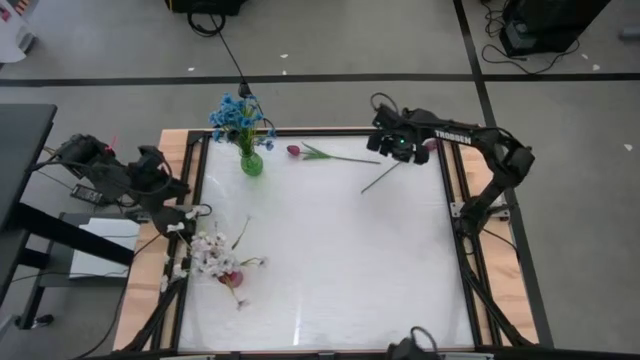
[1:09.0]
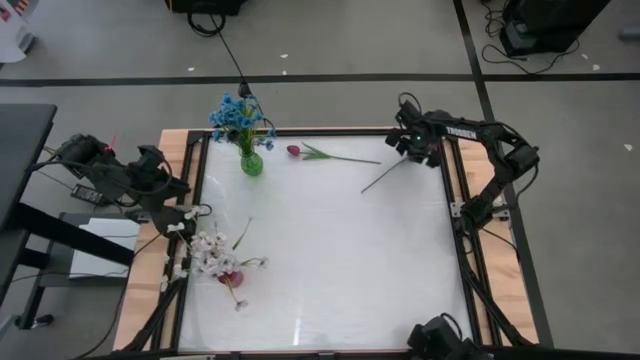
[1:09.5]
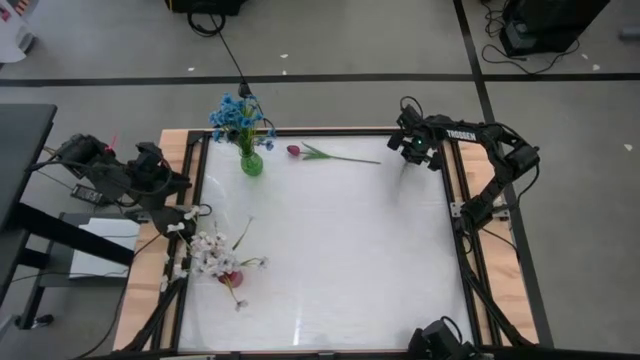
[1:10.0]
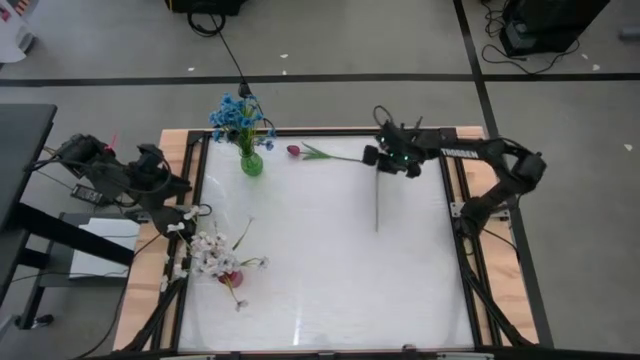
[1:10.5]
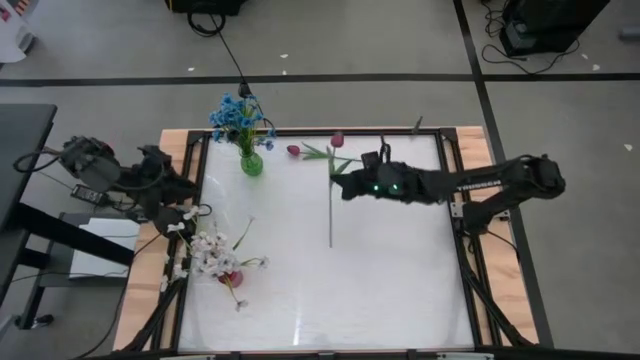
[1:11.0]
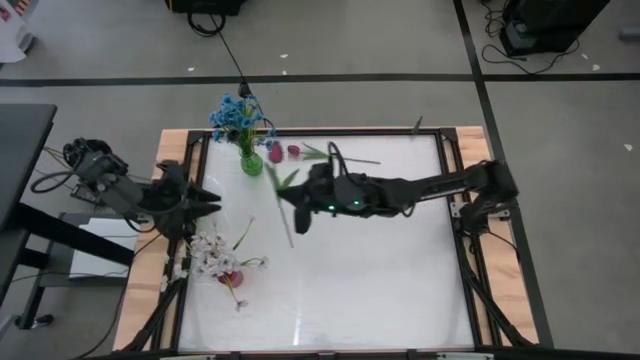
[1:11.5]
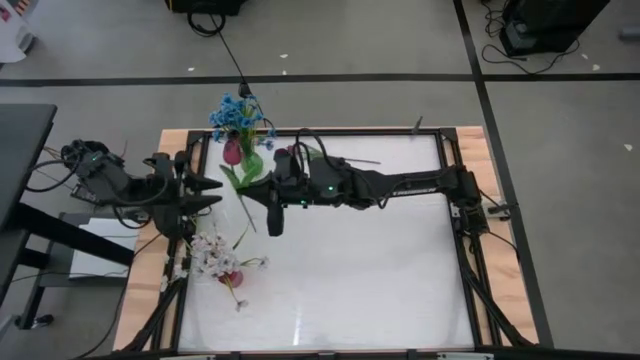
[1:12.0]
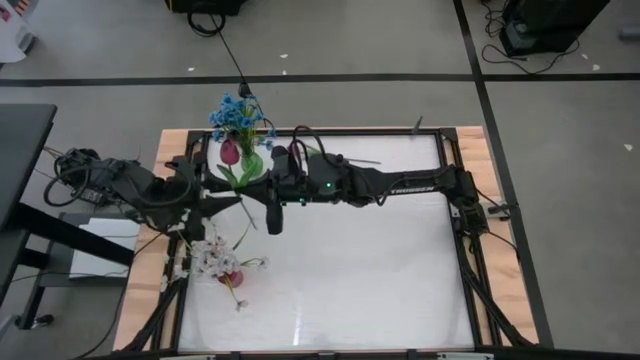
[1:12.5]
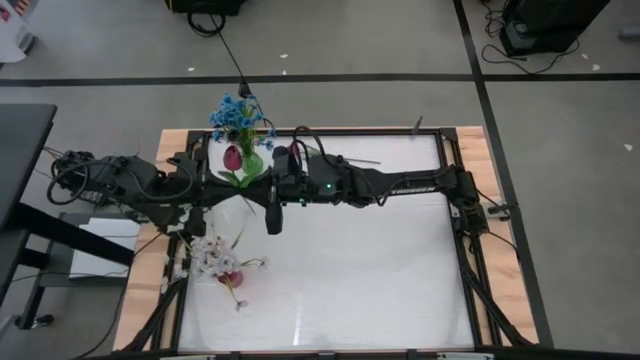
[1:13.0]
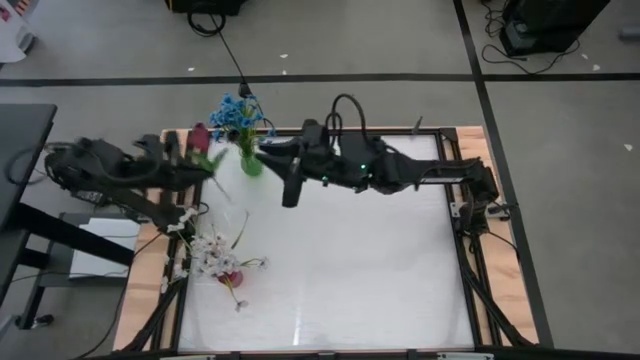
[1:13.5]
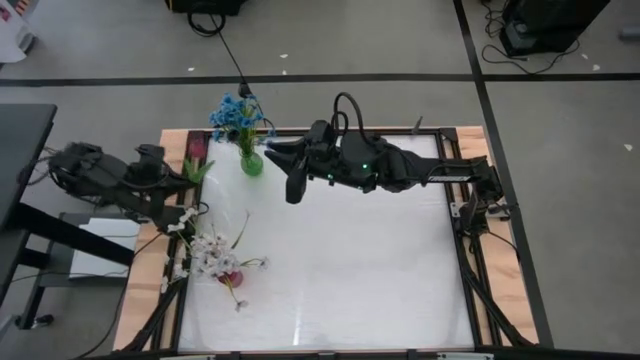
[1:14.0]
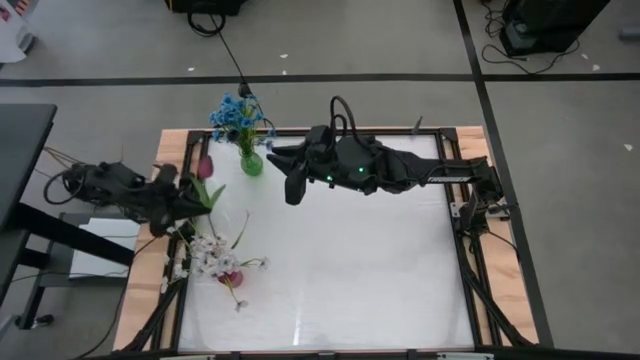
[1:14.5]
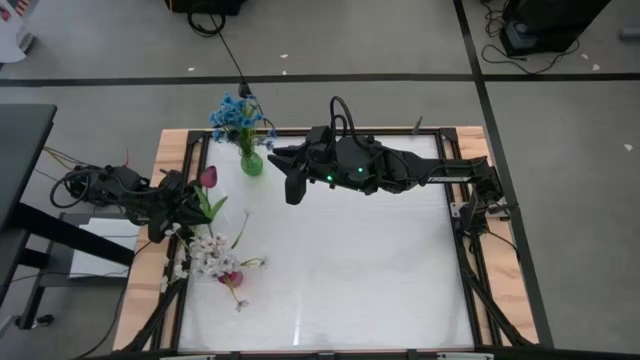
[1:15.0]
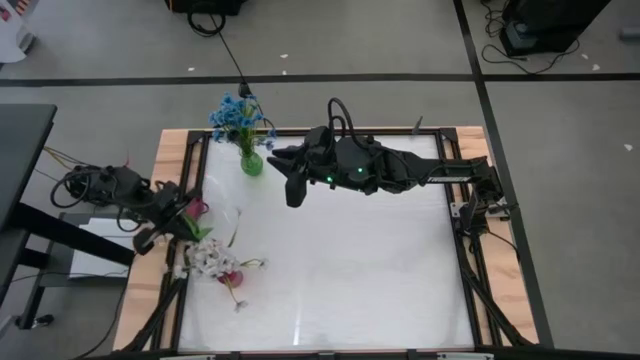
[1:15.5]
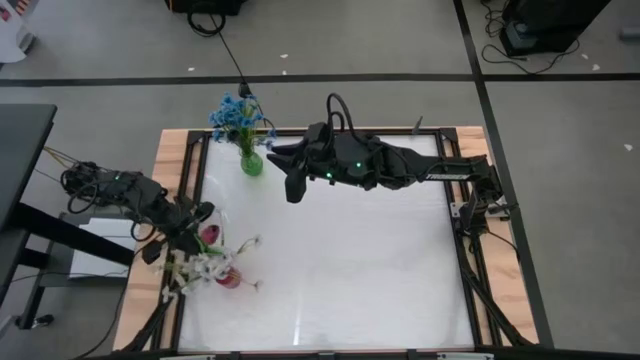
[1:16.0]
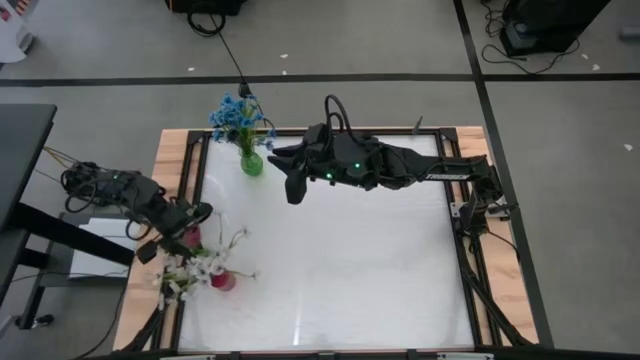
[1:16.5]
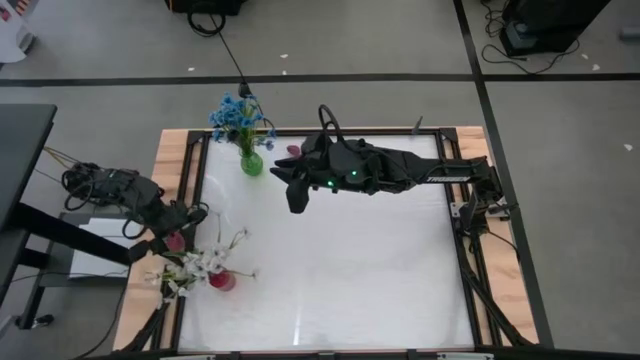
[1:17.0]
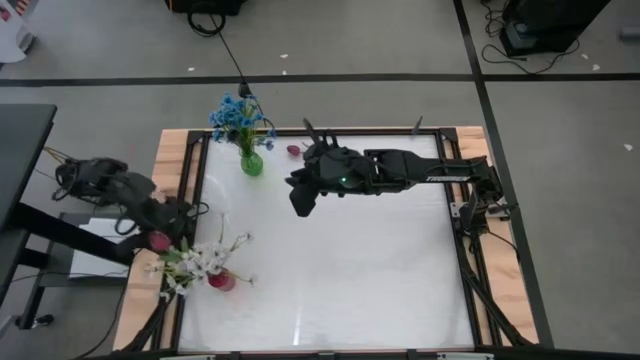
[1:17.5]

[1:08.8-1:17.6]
Task: Sort flowers into vase by color
Put the right red tulip into the red vase

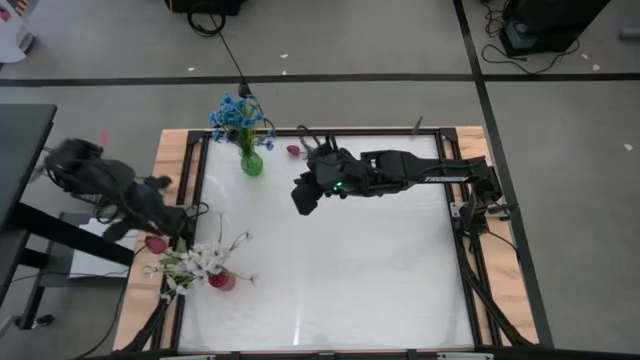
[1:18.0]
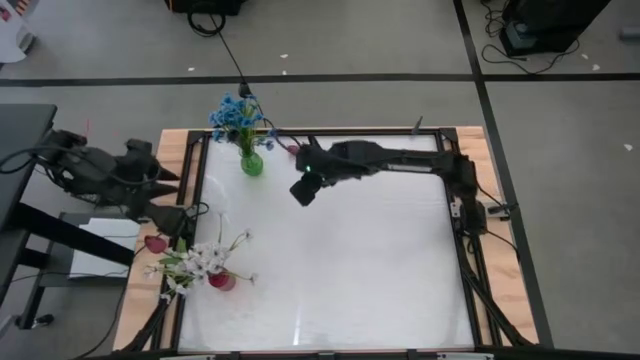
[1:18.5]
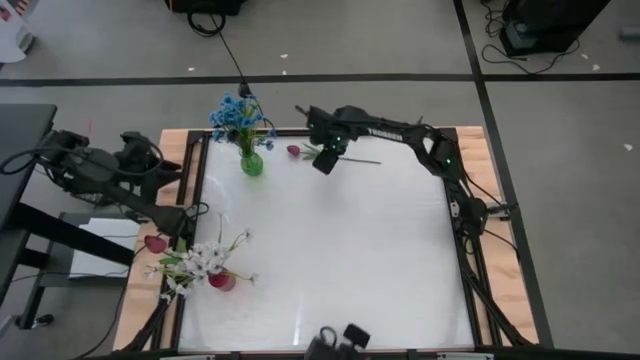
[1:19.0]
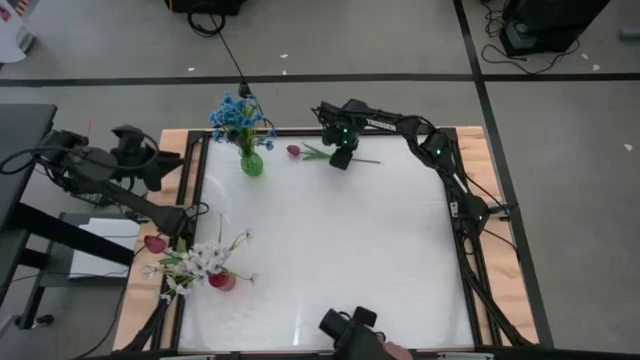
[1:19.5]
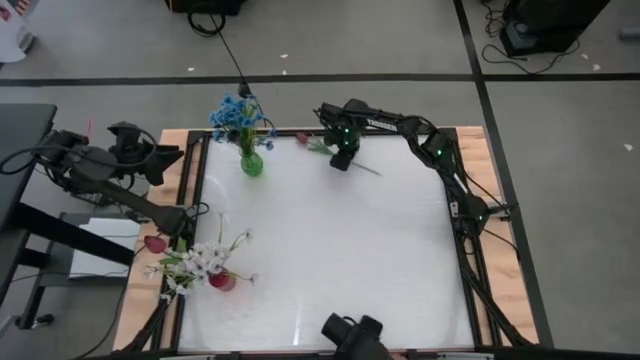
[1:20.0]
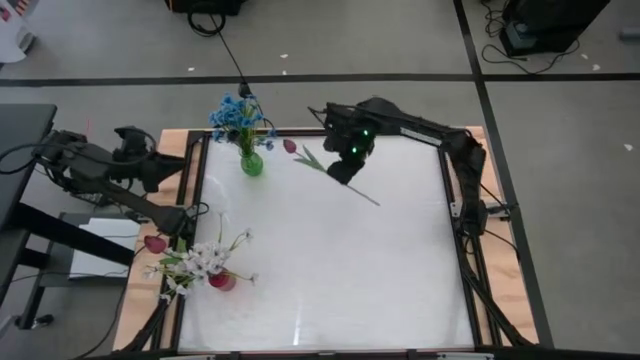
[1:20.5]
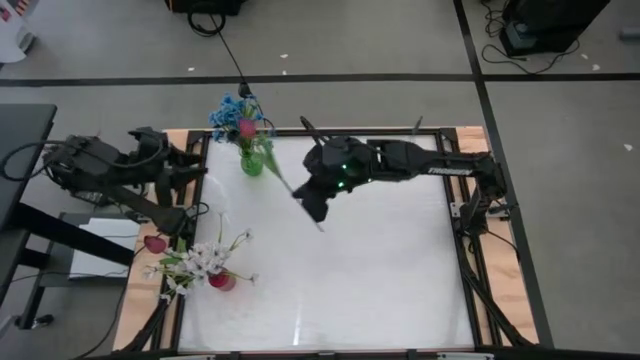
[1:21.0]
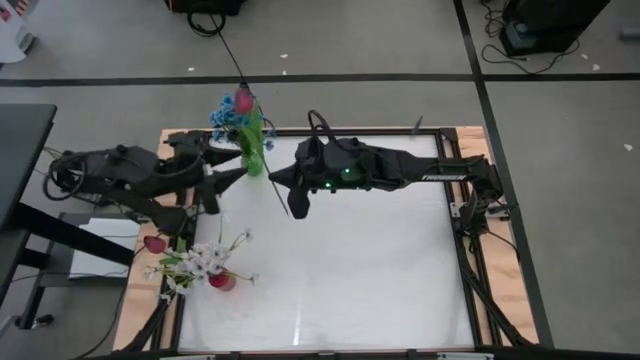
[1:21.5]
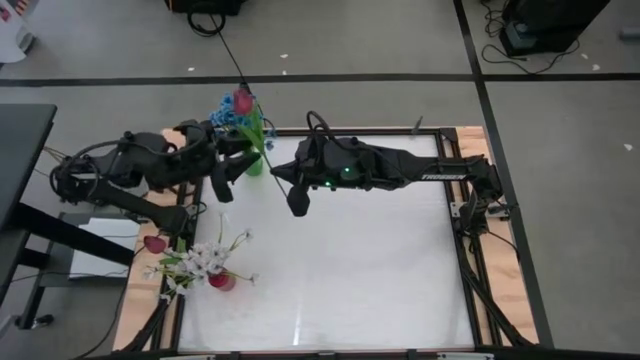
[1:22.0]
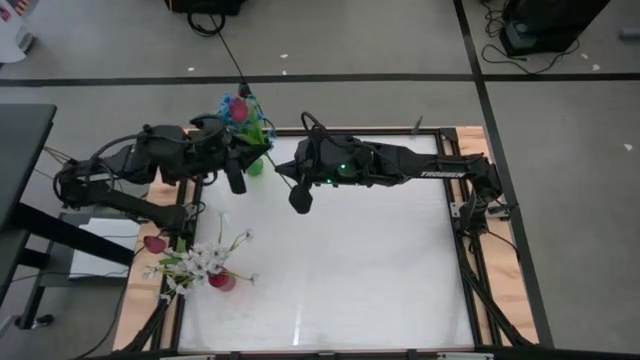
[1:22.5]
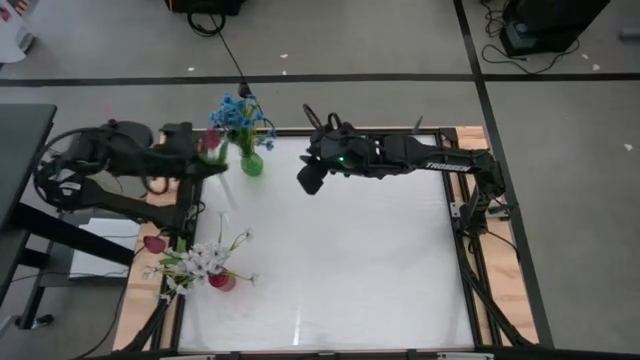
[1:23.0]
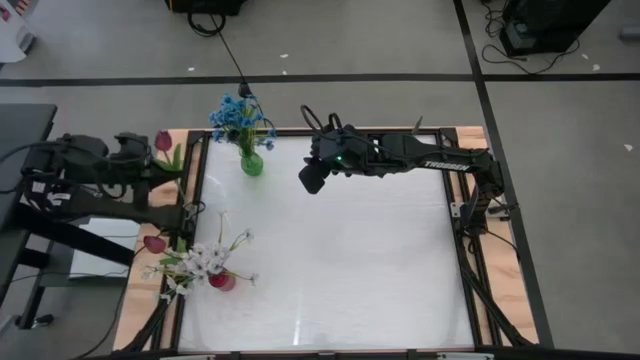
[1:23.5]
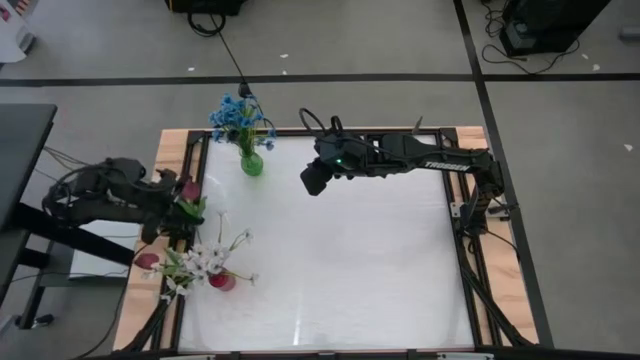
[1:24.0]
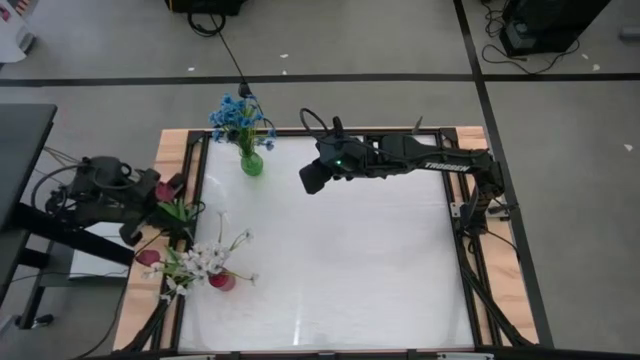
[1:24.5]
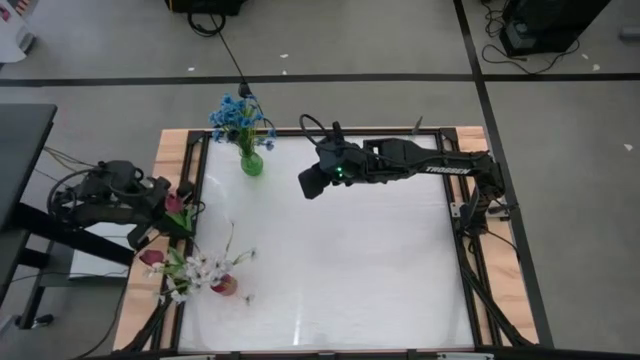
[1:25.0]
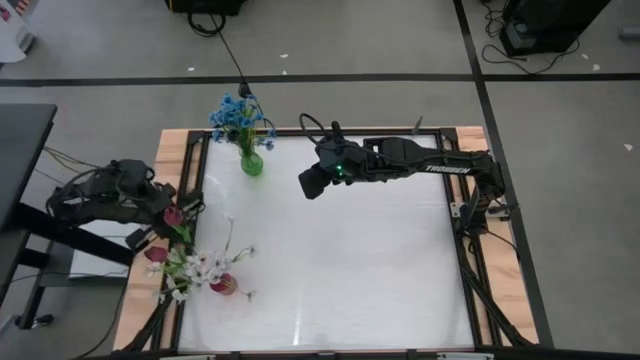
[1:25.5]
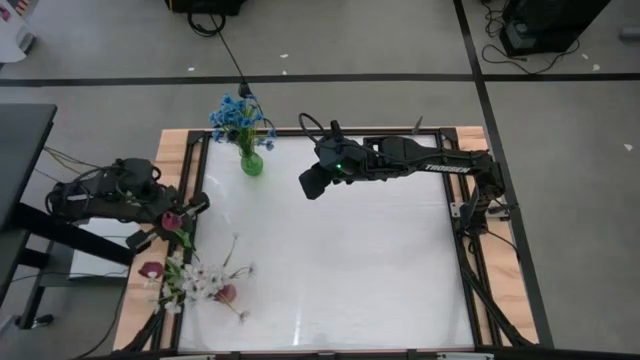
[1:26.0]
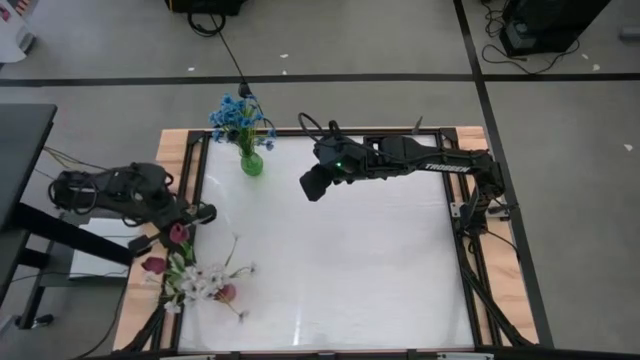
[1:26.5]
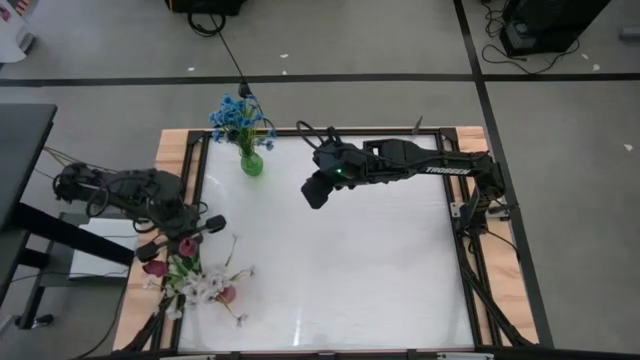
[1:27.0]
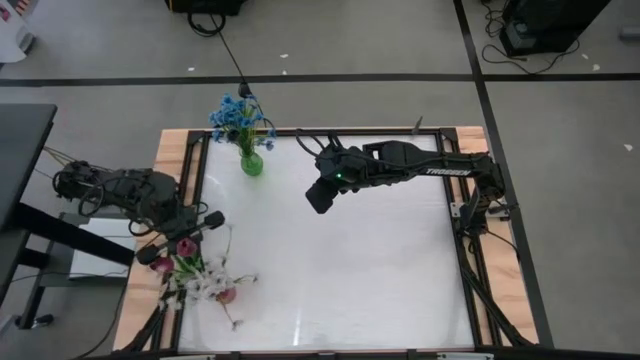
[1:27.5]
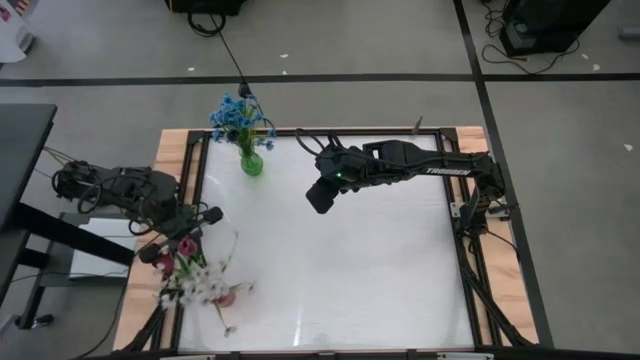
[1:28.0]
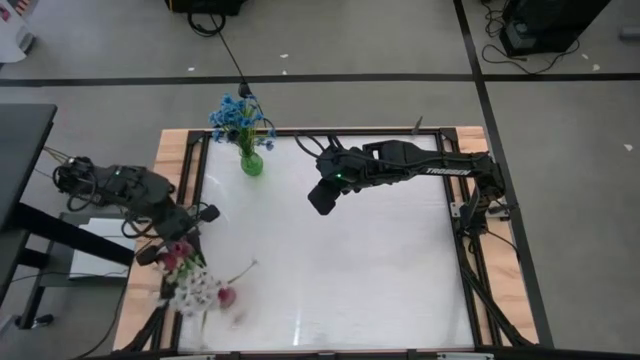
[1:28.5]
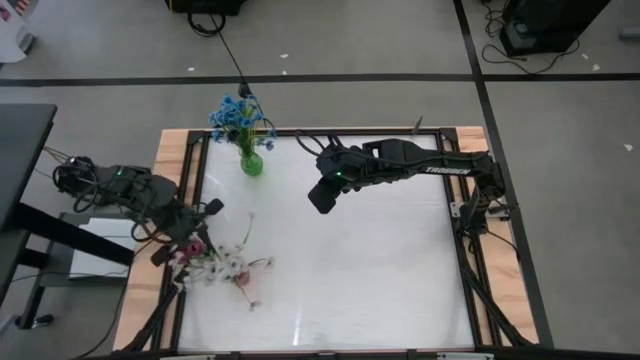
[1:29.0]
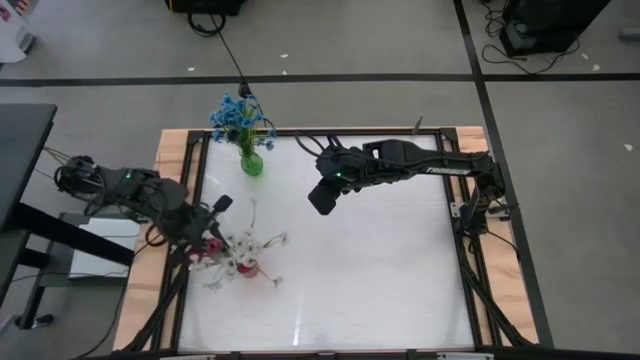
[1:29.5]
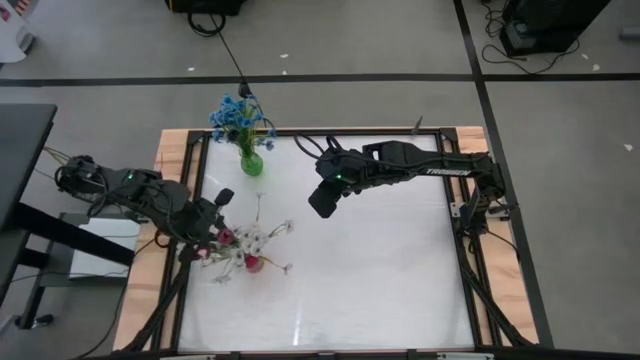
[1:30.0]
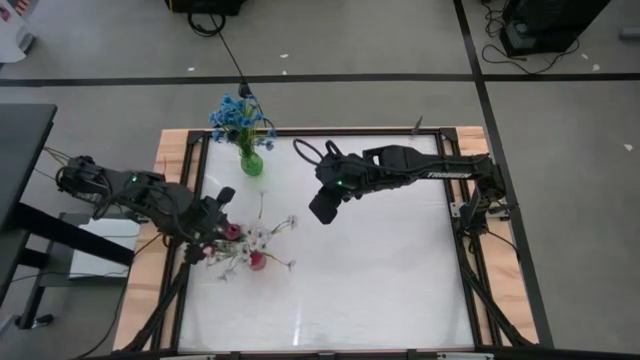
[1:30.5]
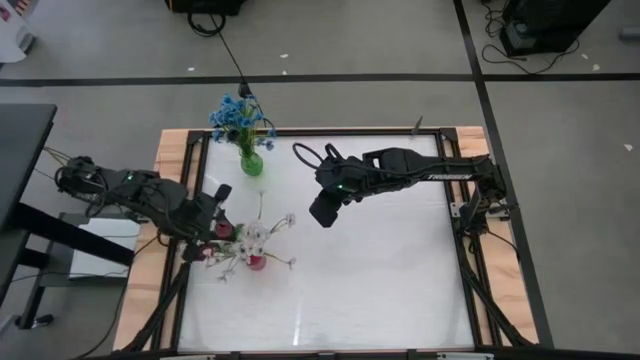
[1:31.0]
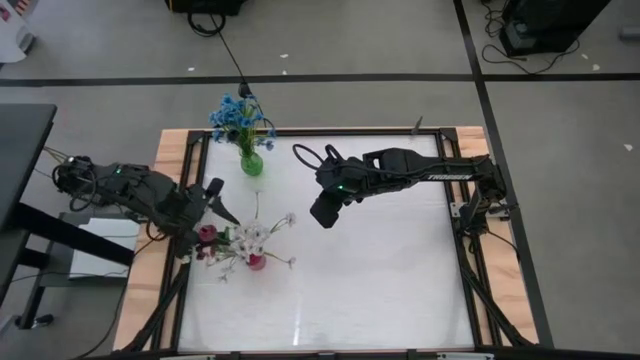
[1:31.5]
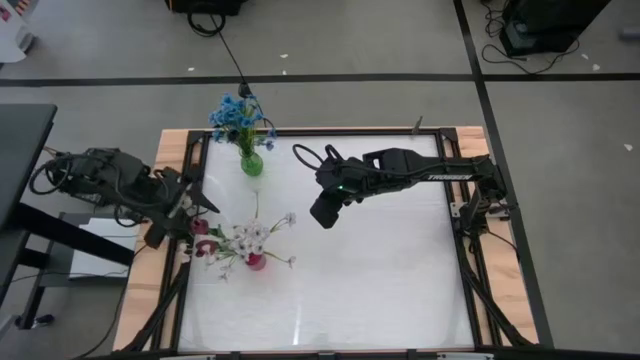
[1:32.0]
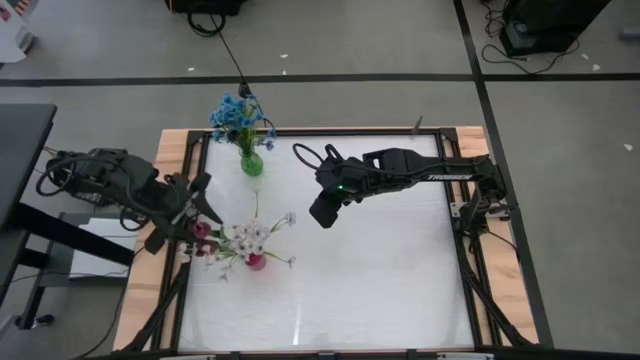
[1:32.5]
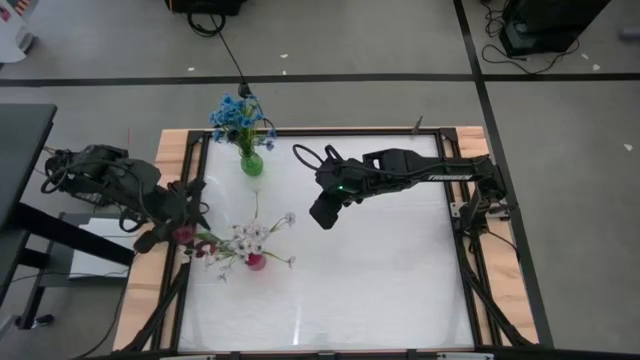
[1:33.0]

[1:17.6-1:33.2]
Put the red tulip into the red vase
